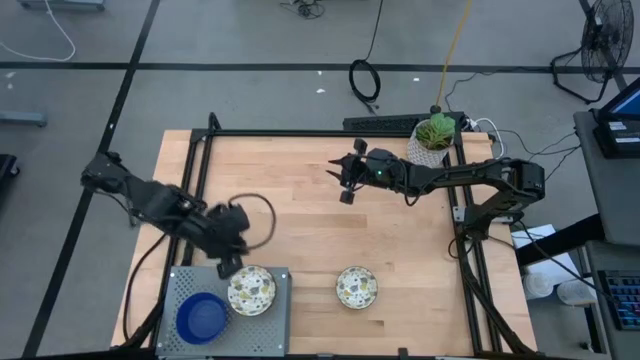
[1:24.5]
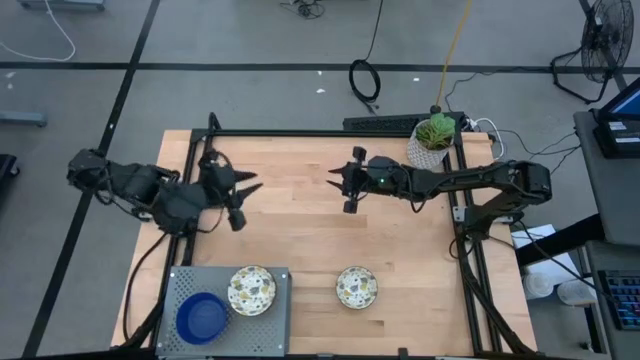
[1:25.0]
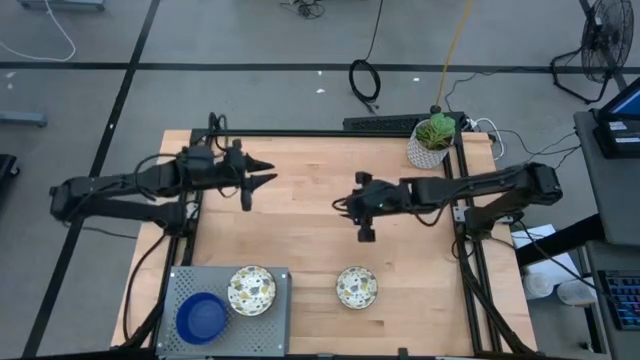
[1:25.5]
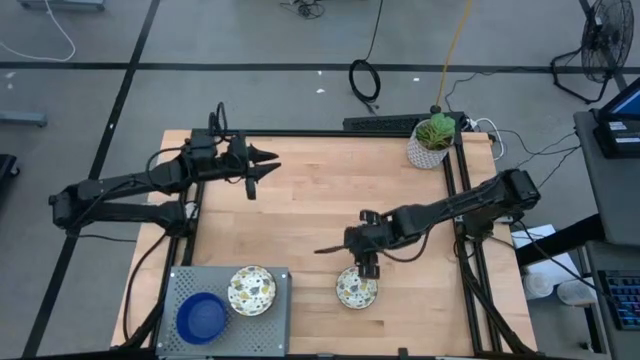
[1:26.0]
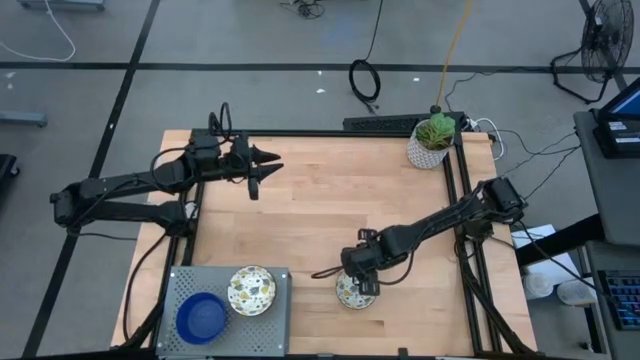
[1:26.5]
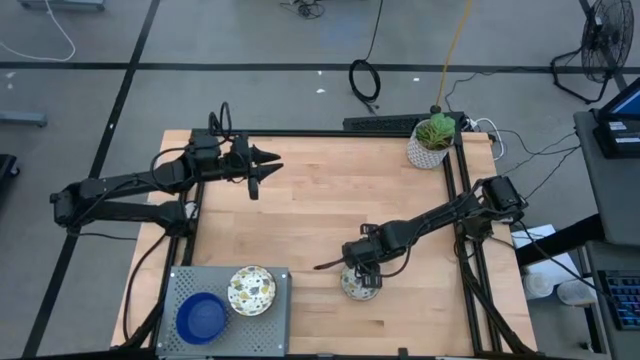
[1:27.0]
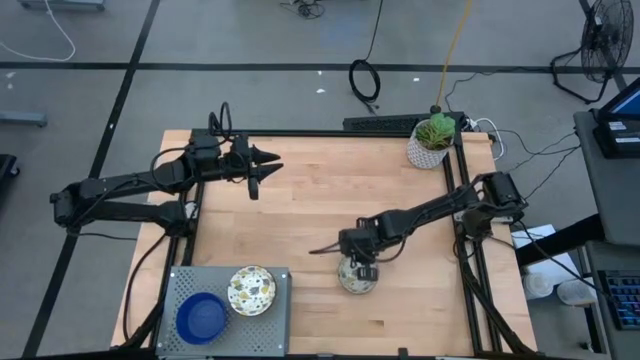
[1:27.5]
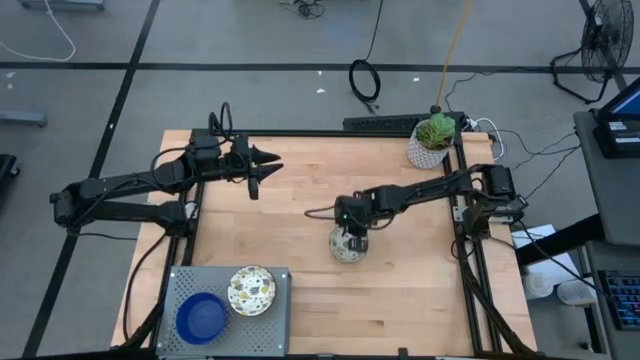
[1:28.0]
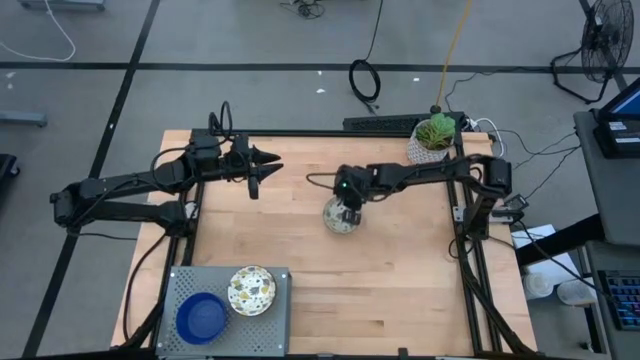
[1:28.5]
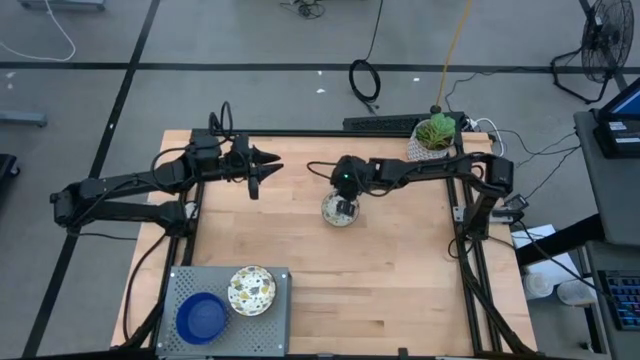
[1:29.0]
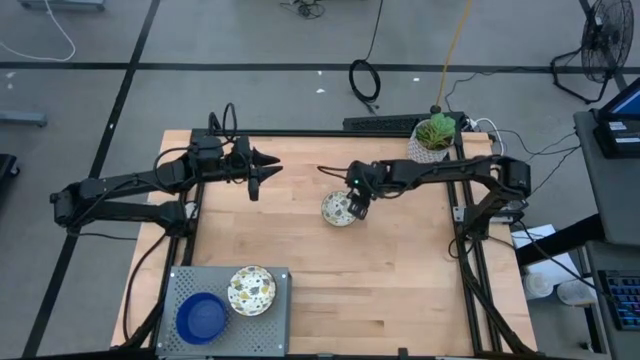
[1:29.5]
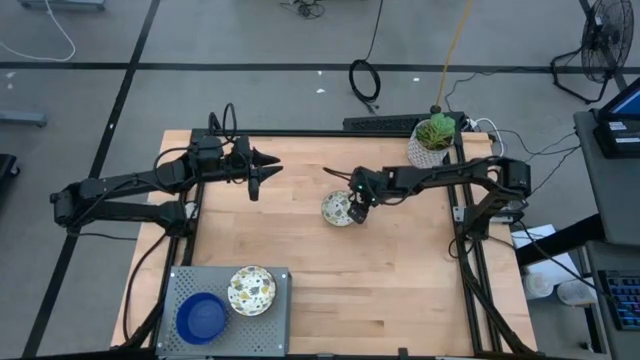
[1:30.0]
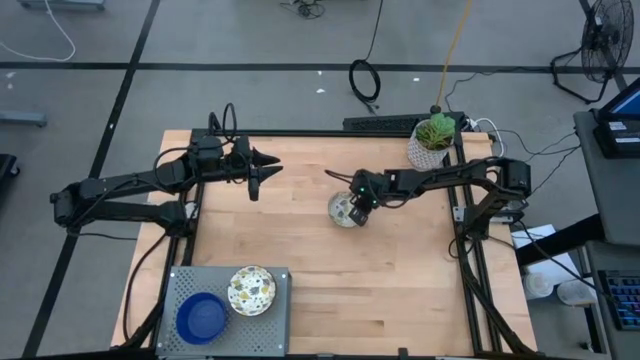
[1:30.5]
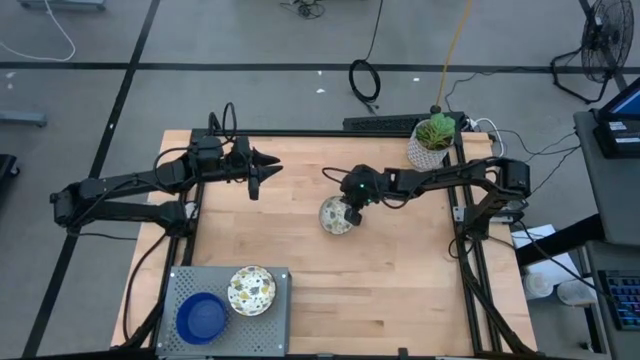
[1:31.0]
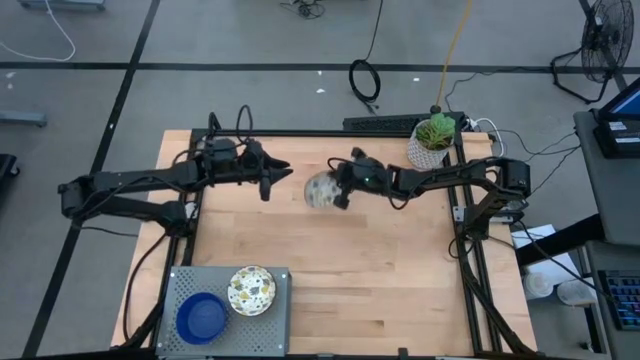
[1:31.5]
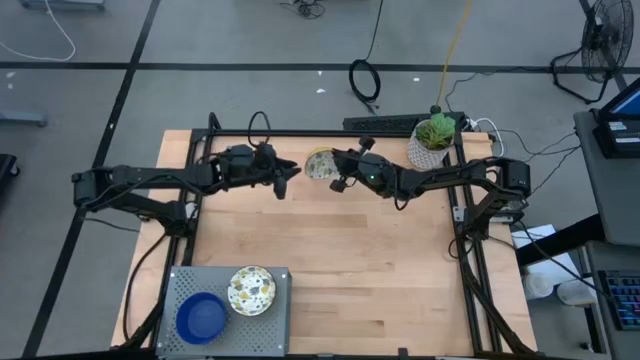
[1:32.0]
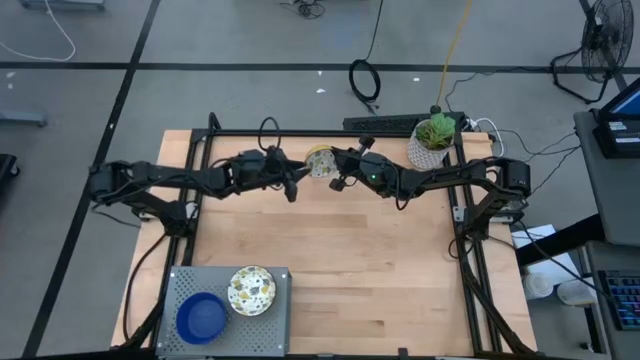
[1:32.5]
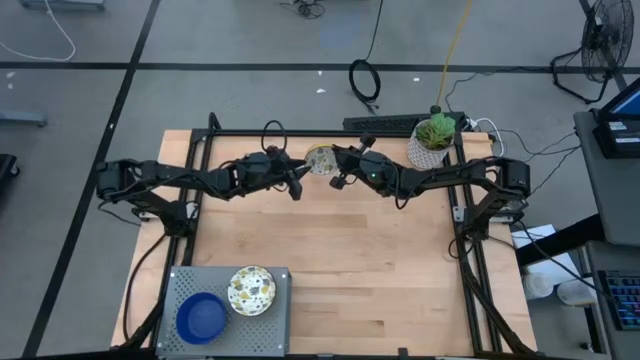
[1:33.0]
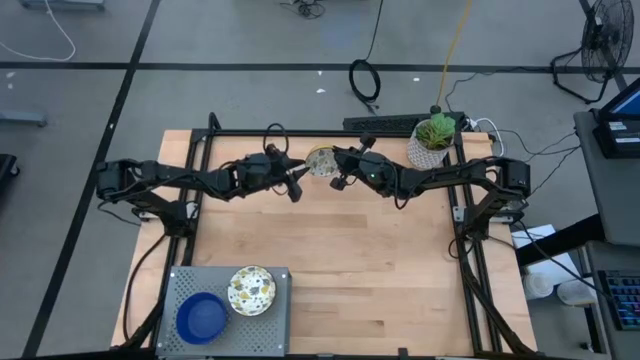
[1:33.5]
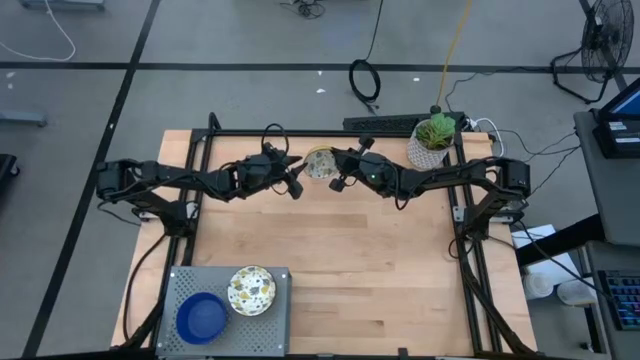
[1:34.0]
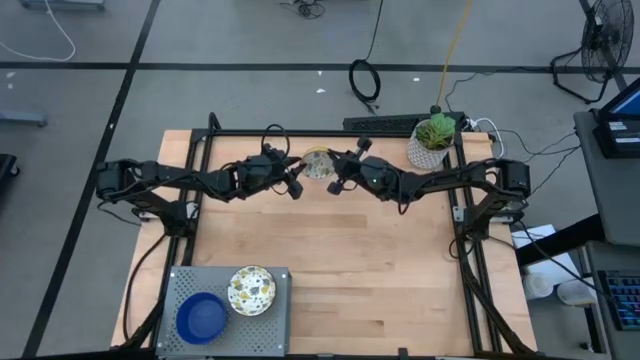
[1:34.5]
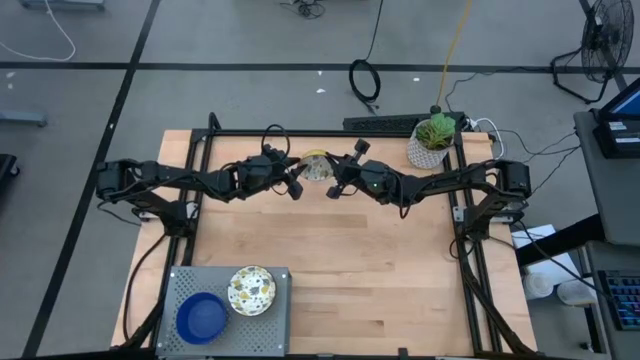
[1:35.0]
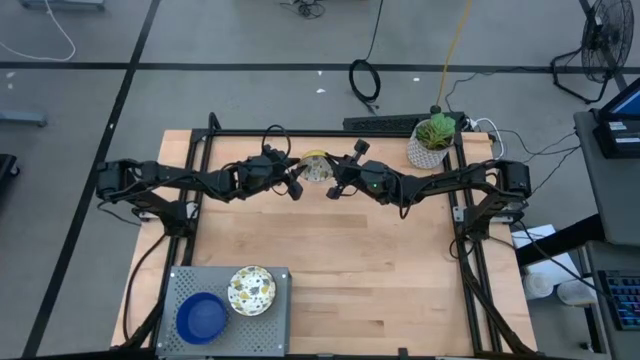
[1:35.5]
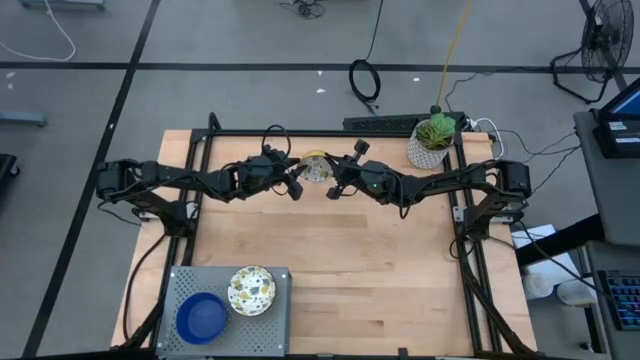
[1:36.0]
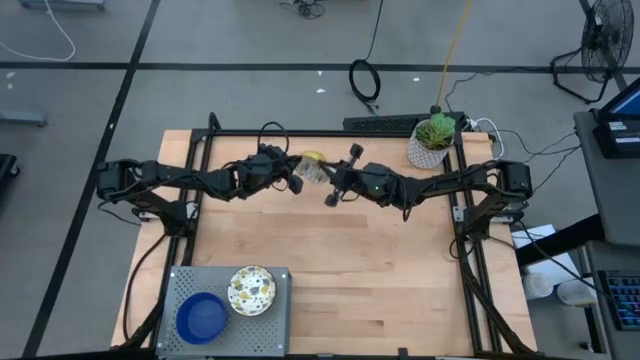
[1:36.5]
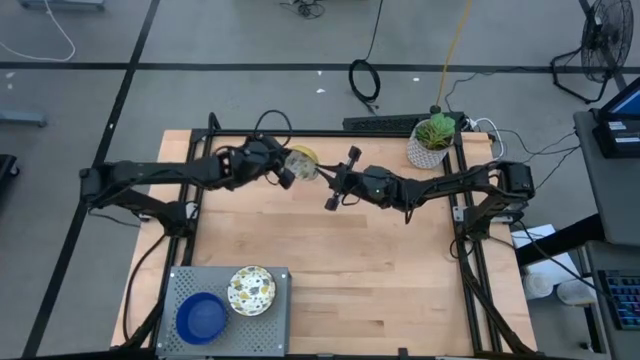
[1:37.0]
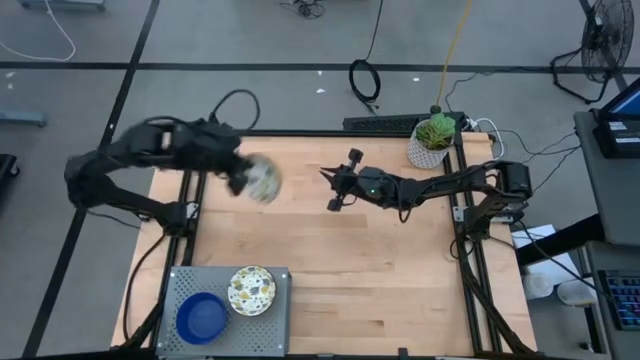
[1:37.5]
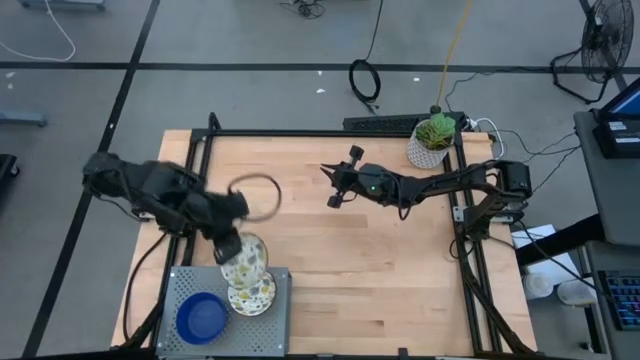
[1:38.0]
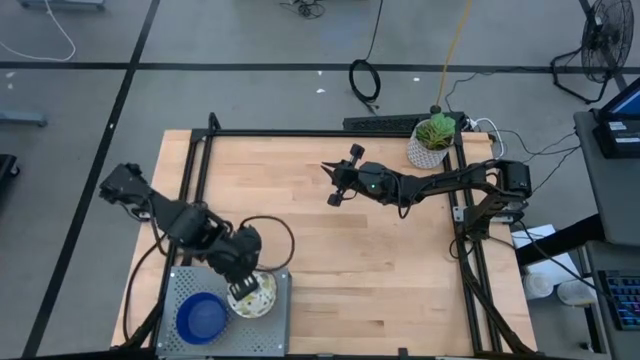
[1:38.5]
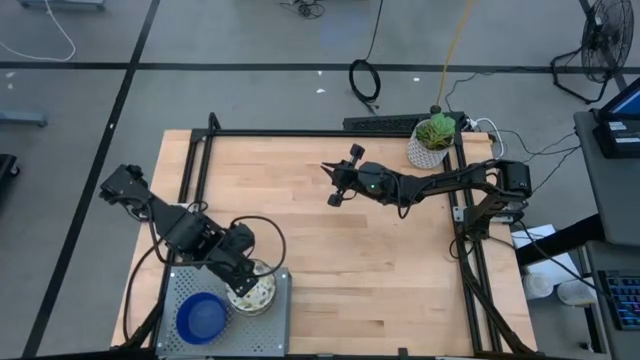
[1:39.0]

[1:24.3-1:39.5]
Task: Pick & Place Mini bowls
Stack the white patterned bowl on top of the other white patterned bowls on the shelf

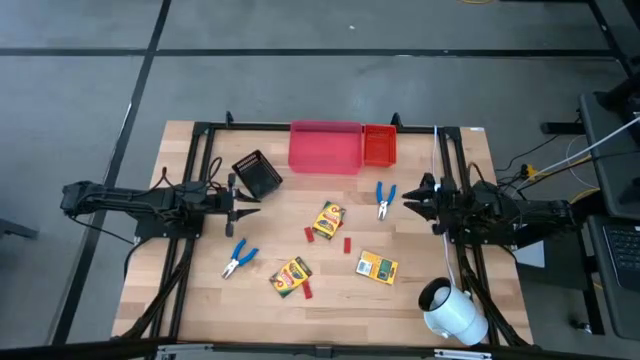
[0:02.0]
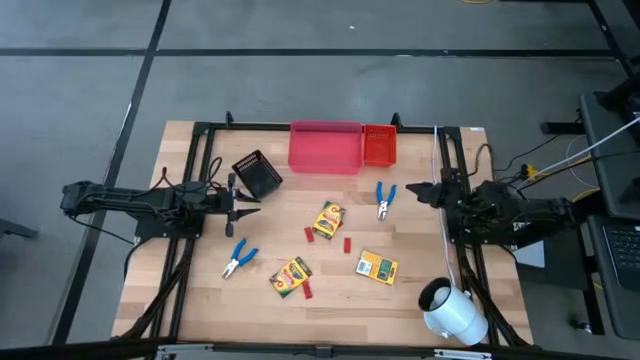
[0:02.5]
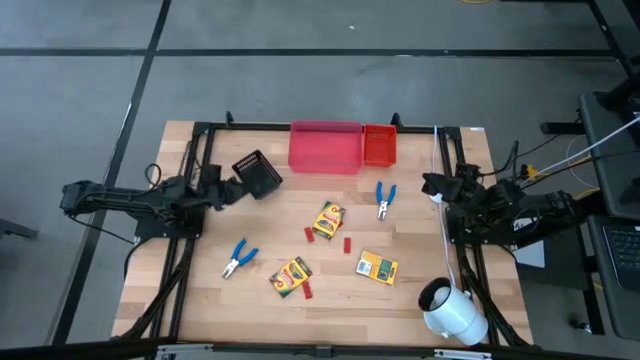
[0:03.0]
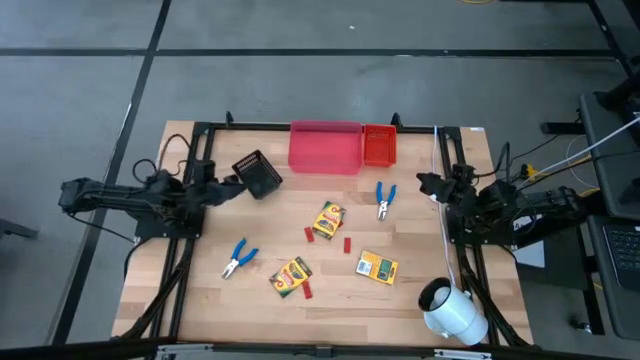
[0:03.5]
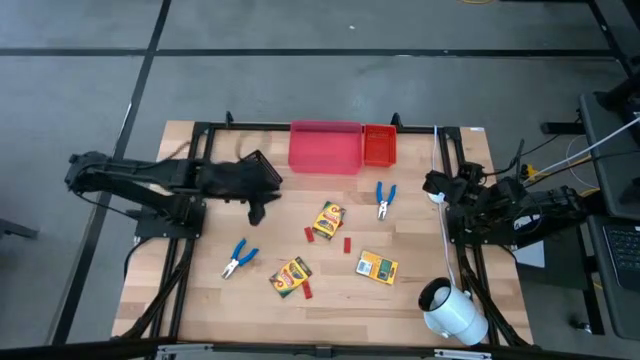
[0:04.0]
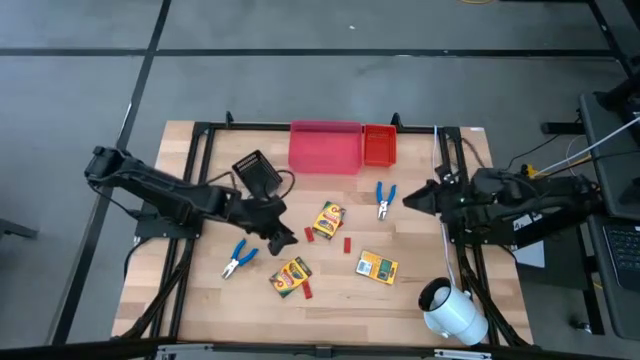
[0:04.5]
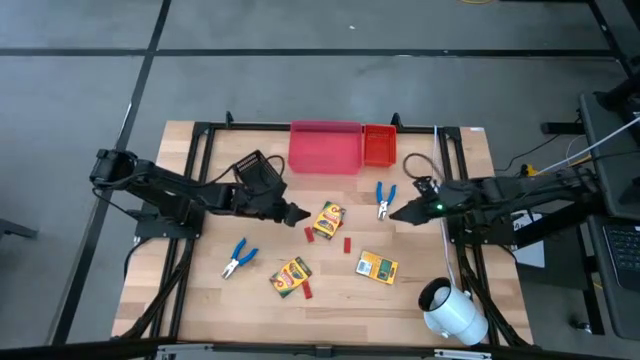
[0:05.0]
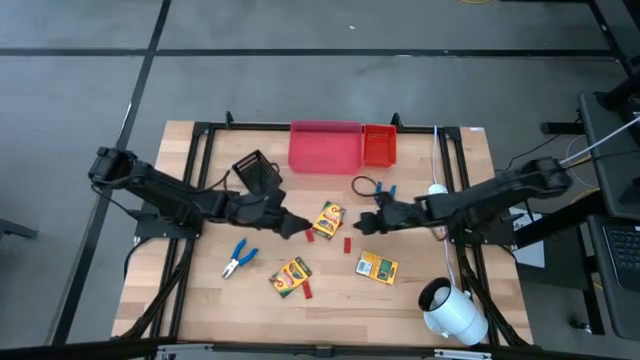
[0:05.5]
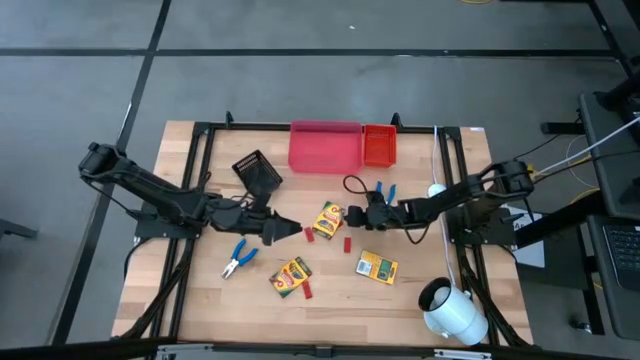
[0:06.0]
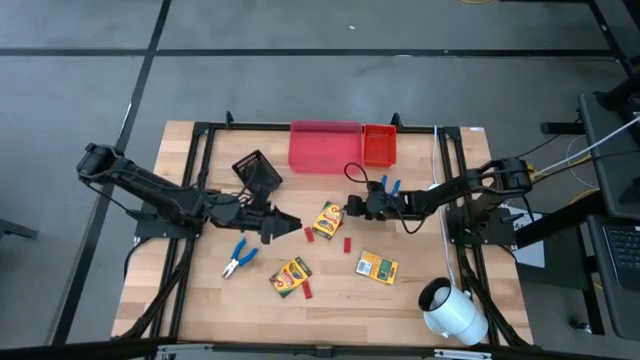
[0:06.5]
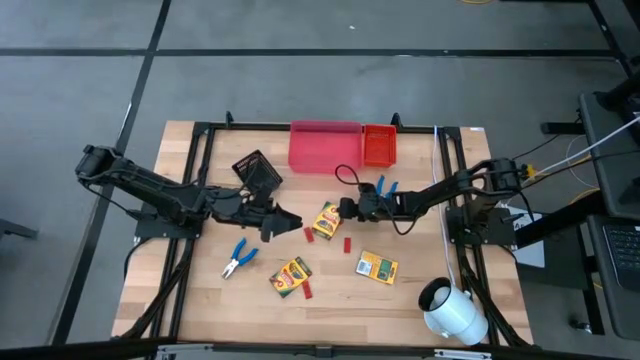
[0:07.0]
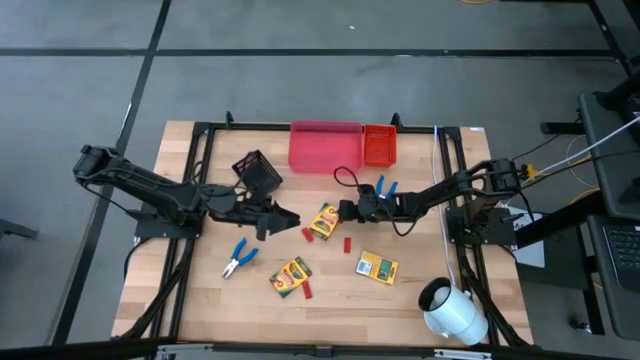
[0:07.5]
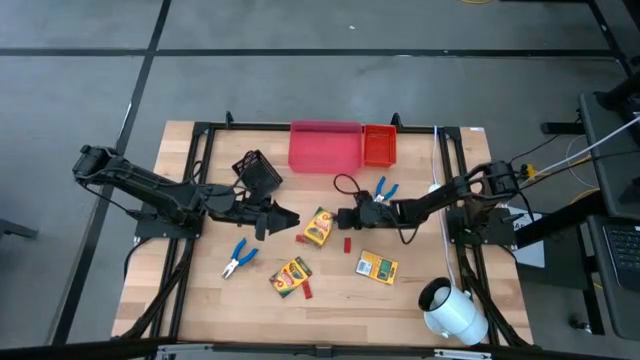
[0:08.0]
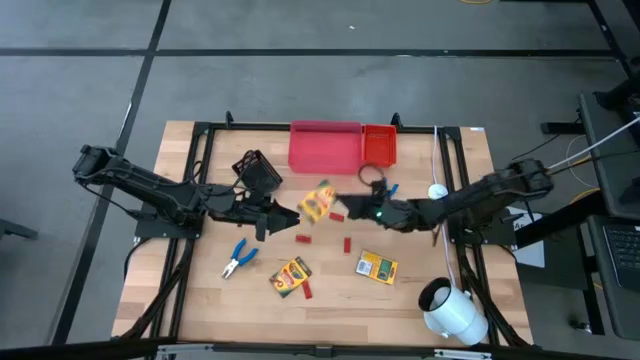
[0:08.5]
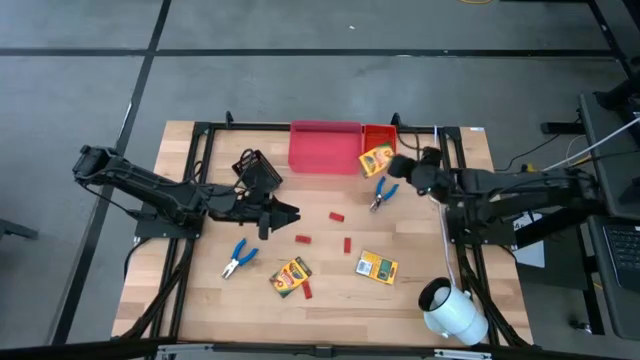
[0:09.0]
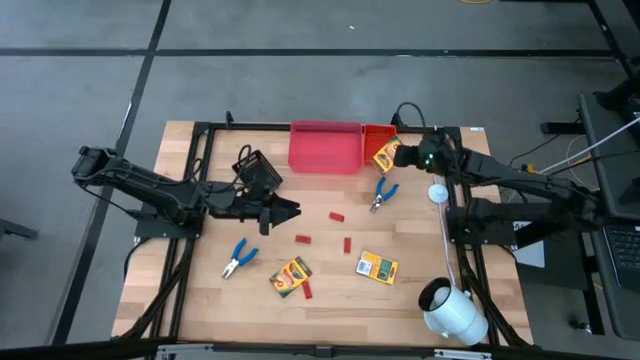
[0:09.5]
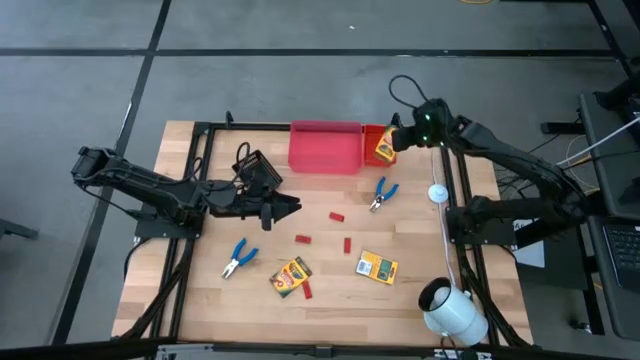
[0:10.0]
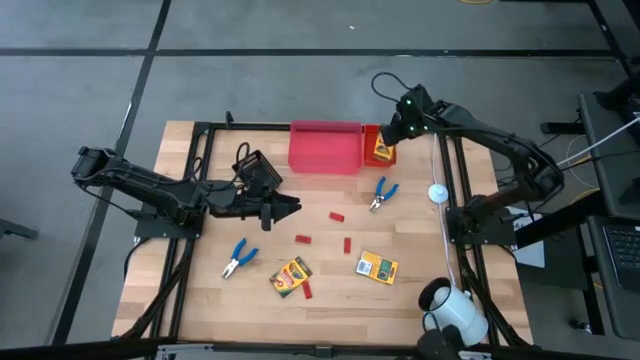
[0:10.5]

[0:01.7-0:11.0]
Task: Pick & Place School Supplies
Put the yellow crayon box into the red bin
